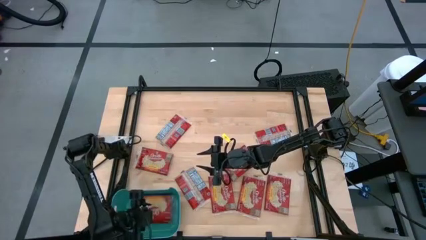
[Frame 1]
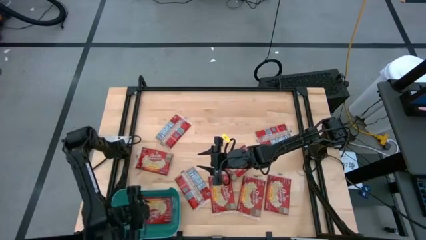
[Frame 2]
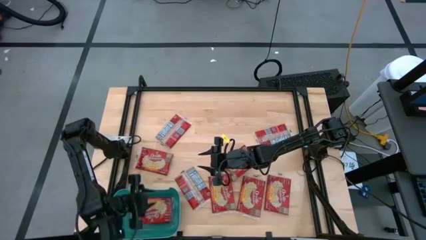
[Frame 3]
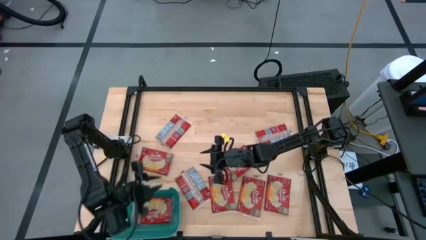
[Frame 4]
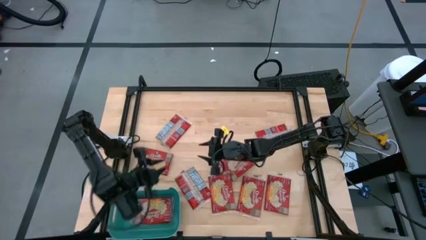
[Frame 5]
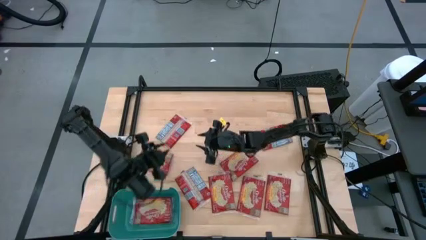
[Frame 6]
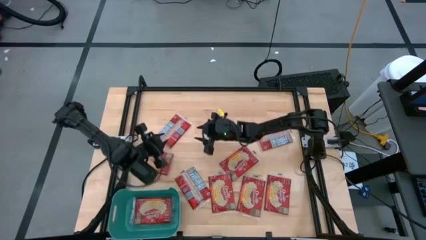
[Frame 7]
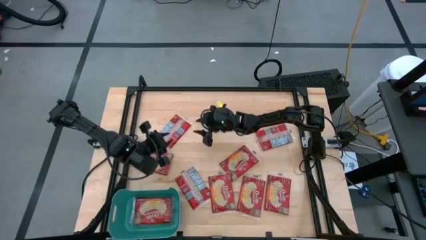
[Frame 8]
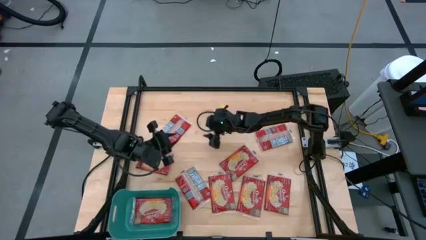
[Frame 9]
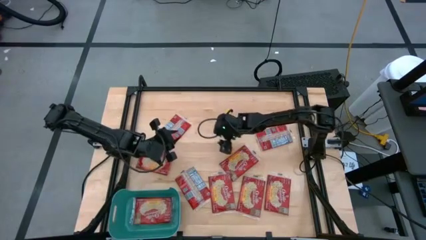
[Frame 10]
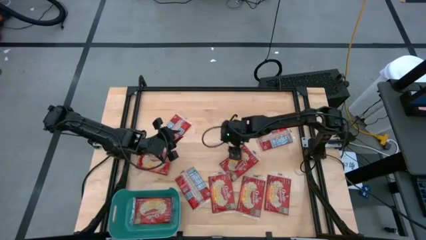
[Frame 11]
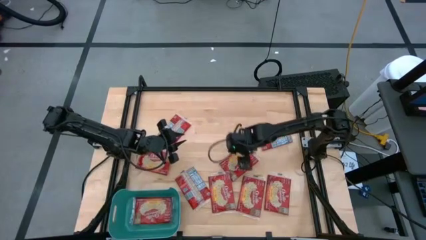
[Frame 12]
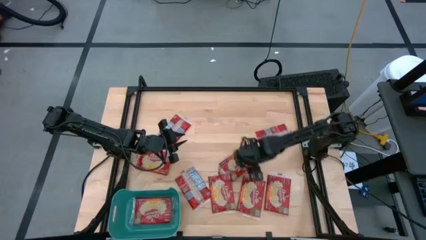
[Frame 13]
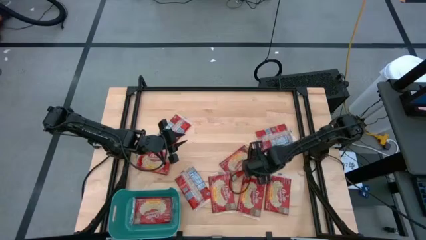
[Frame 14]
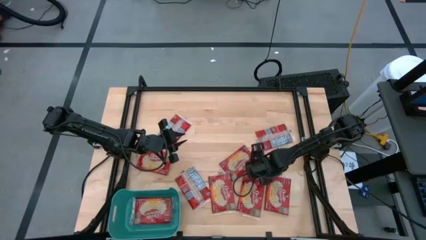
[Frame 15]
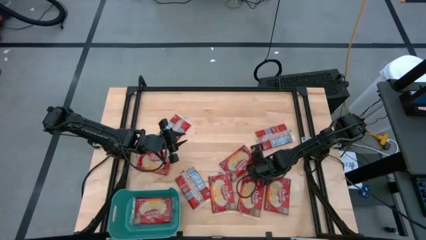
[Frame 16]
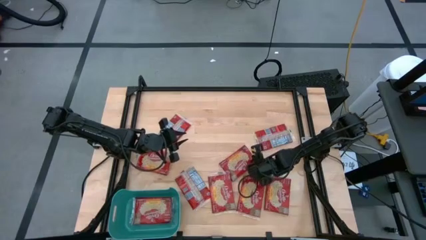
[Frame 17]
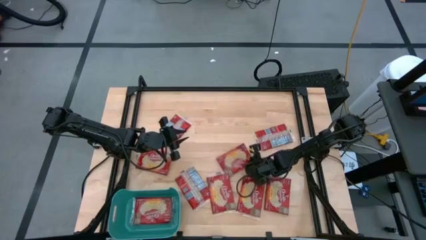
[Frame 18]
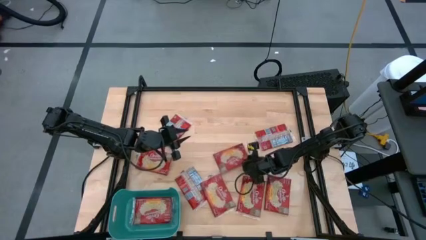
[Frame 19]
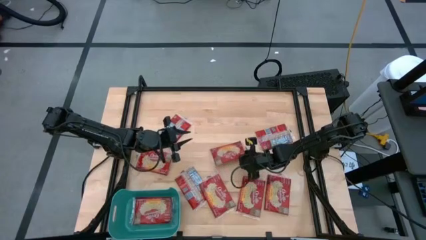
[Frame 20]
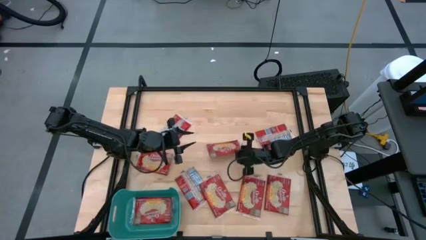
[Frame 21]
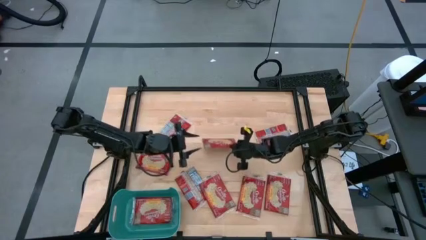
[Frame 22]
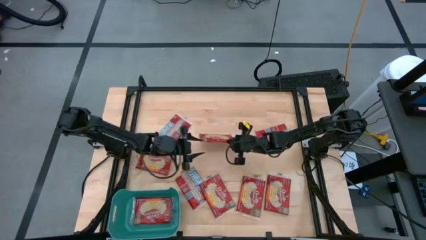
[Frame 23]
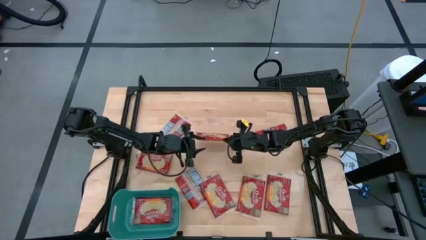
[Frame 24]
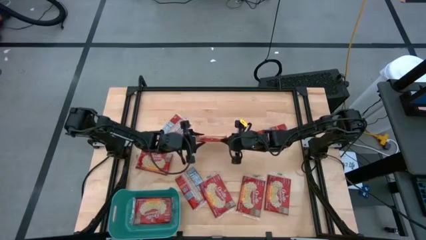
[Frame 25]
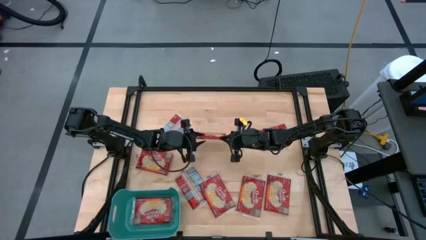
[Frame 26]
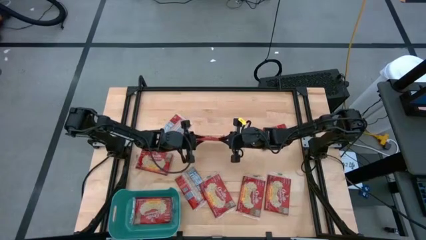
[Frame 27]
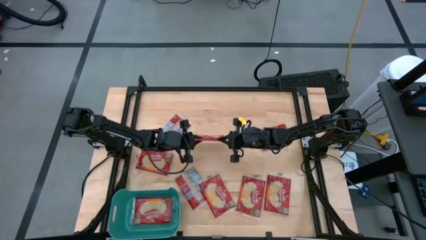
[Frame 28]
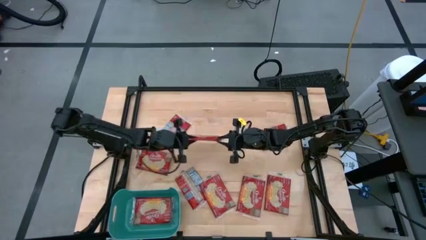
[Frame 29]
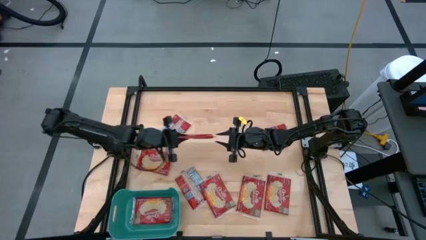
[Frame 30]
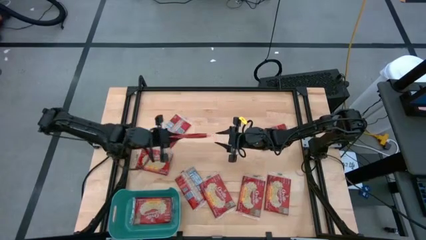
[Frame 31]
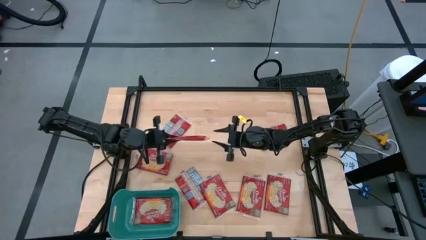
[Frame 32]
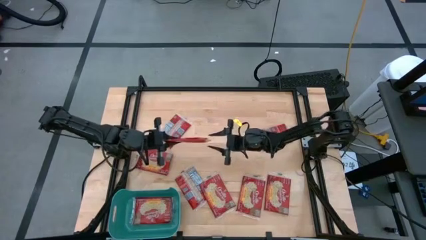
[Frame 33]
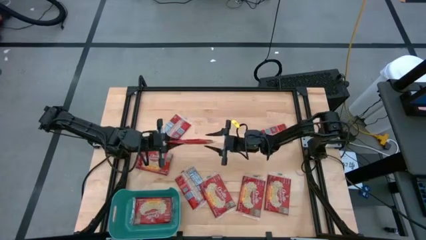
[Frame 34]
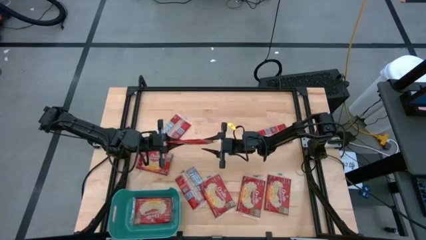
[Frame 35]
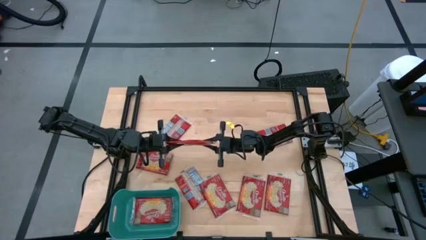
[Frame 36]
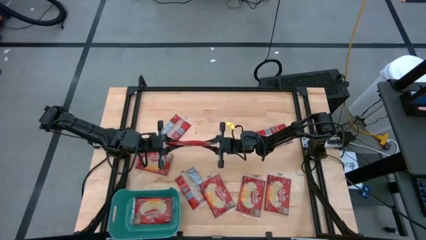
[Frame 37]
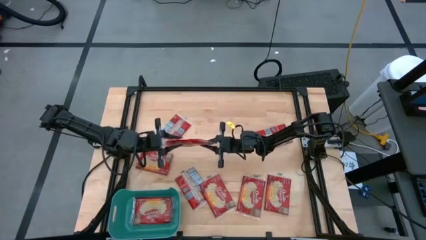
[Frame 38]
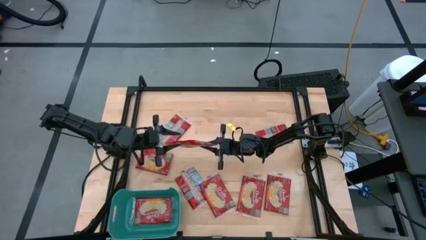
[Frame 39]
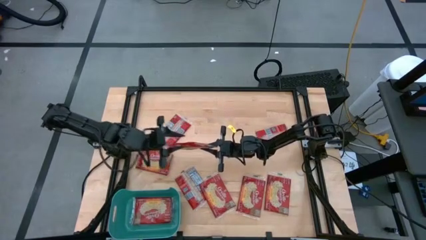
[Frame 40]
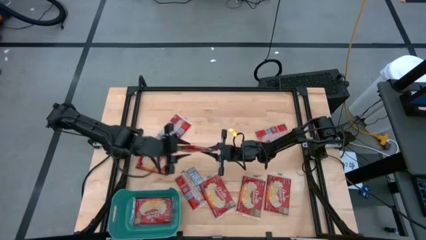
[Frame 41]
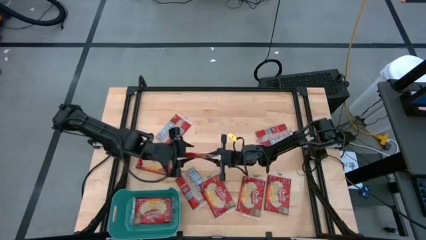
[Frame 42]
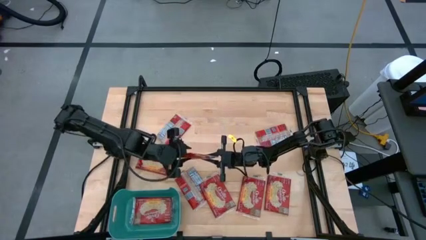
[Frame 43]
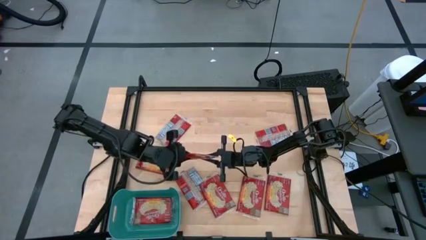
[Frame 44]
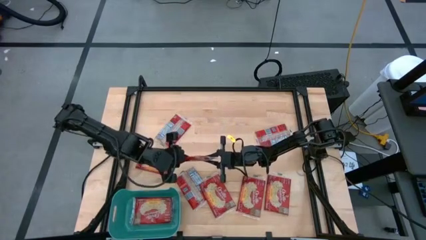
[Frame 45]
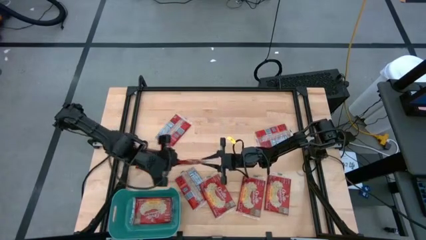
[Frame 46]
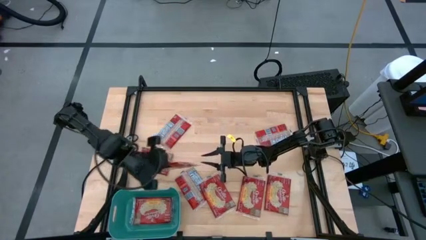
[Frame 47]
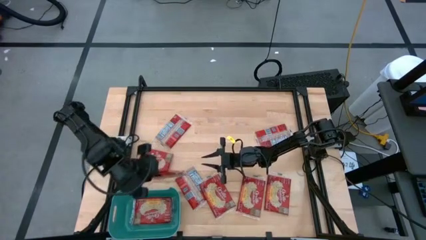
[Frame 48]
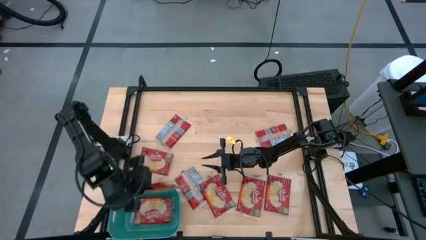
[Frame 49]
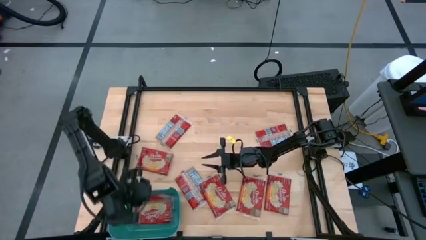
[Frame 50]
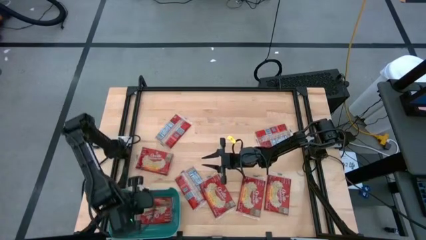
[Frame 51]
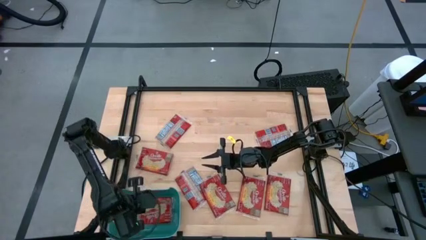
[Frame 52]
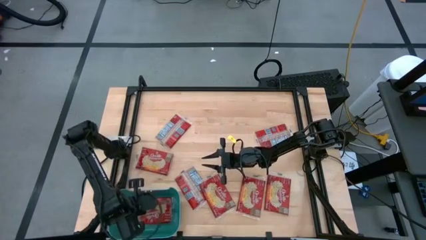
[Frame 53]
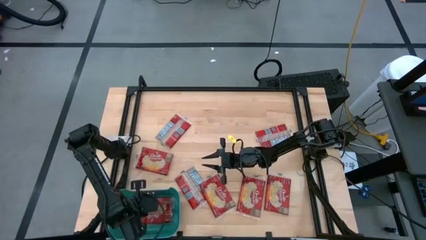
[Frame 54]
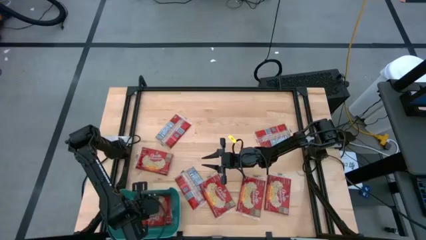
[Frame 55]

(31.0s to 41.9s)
Task: Sort popcorn bags into baskets
Put the red popcorn bag into the blue container

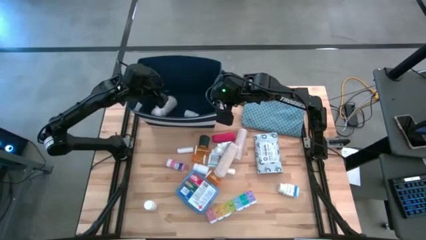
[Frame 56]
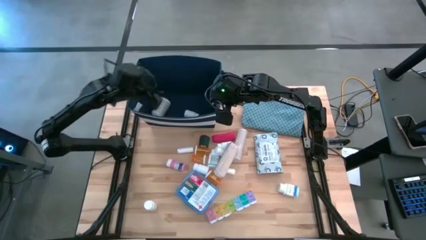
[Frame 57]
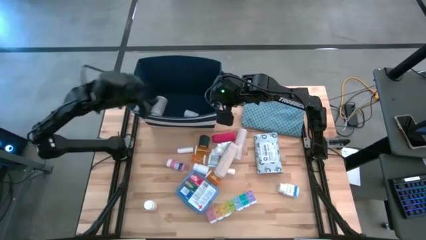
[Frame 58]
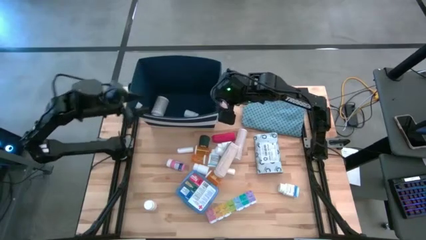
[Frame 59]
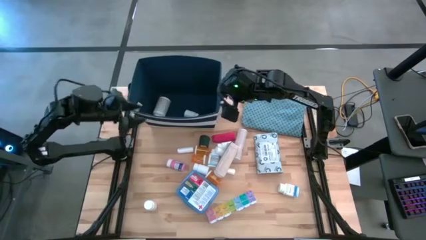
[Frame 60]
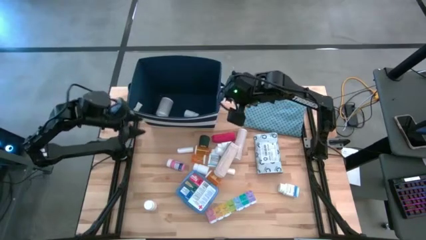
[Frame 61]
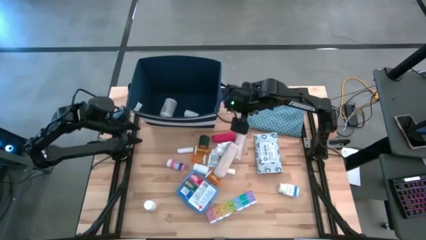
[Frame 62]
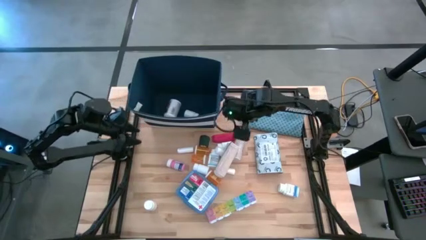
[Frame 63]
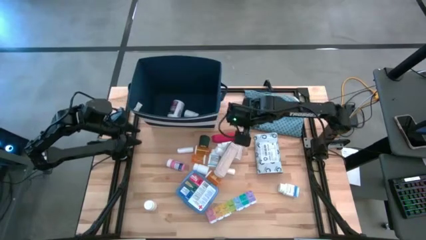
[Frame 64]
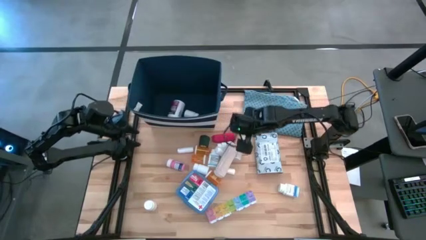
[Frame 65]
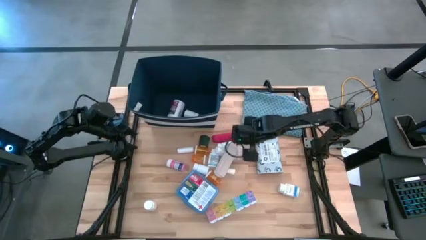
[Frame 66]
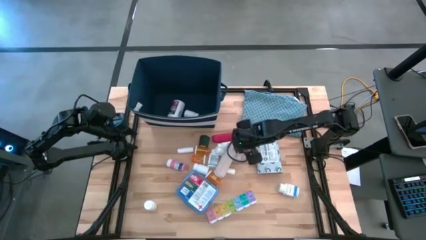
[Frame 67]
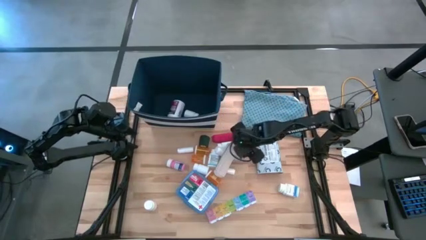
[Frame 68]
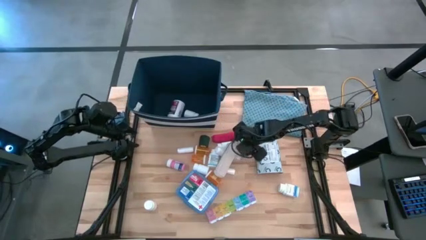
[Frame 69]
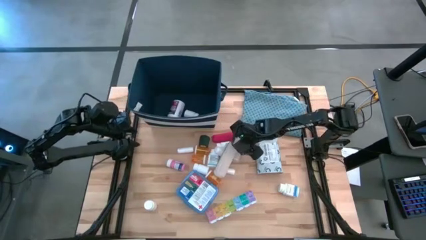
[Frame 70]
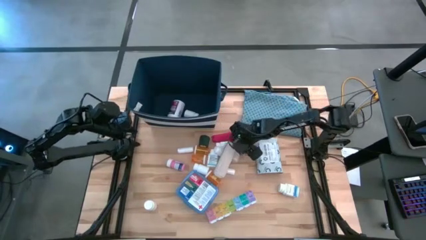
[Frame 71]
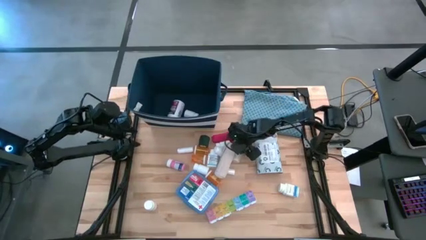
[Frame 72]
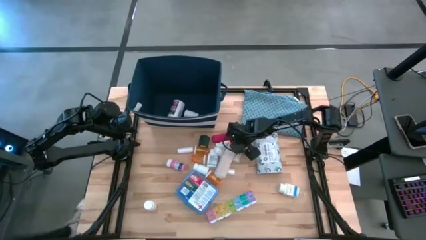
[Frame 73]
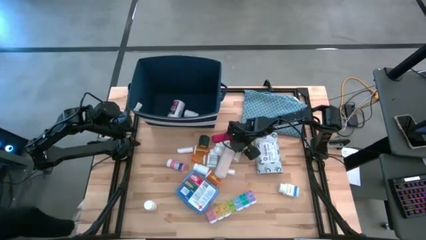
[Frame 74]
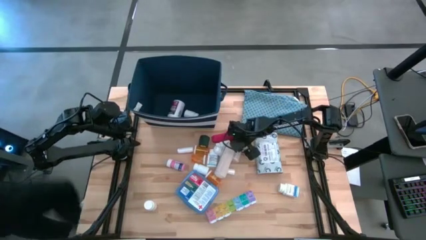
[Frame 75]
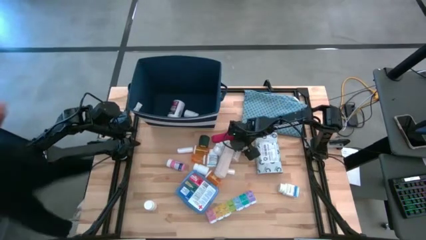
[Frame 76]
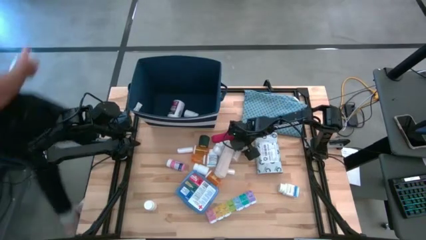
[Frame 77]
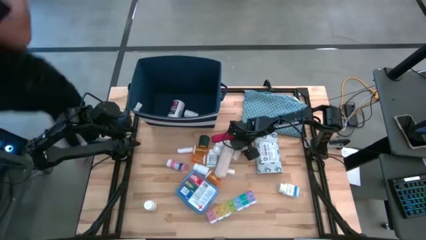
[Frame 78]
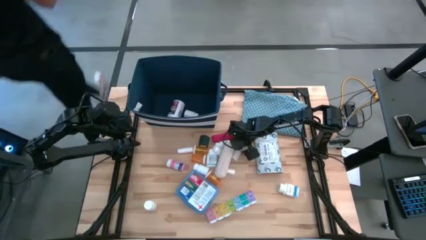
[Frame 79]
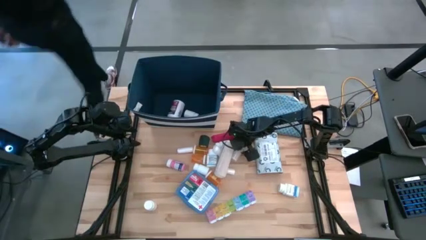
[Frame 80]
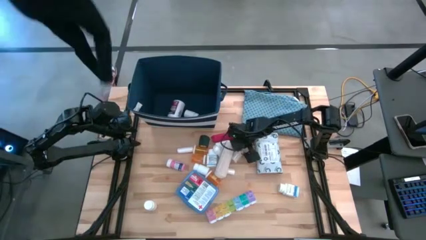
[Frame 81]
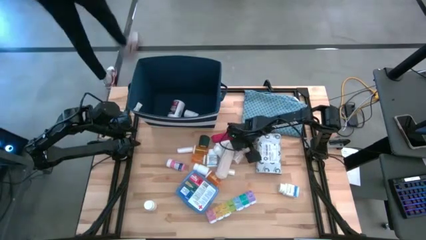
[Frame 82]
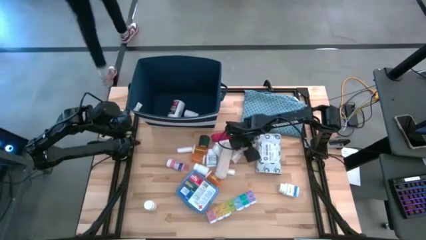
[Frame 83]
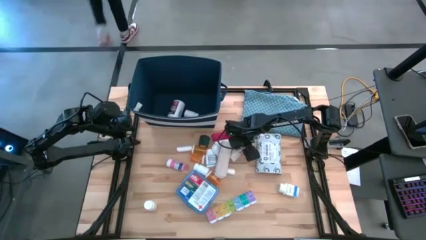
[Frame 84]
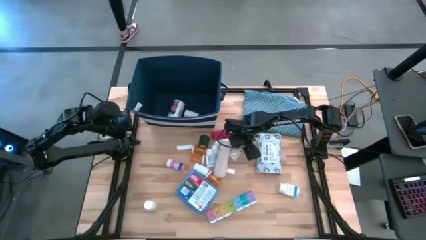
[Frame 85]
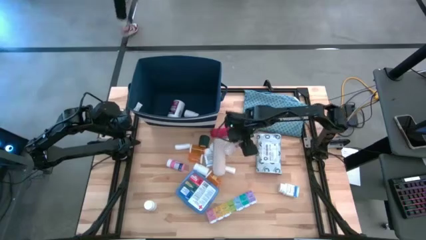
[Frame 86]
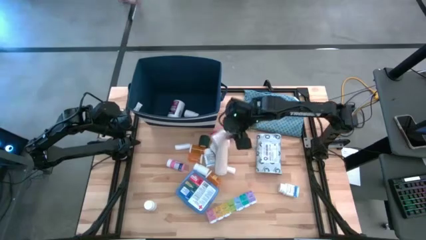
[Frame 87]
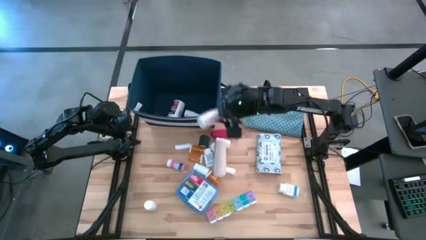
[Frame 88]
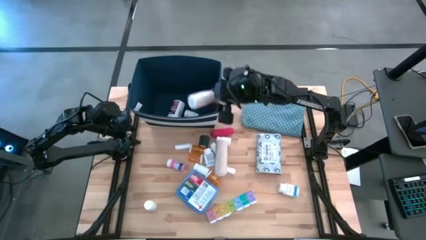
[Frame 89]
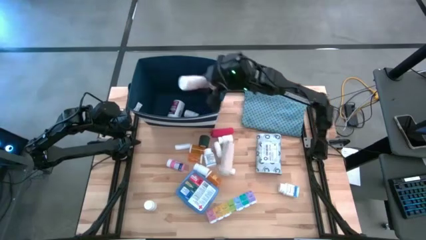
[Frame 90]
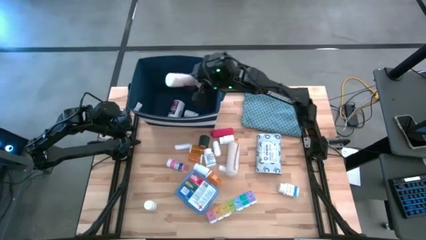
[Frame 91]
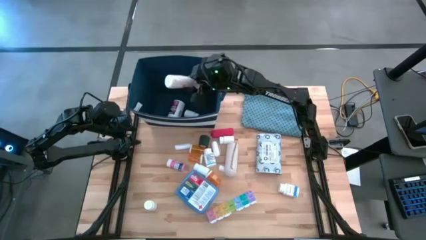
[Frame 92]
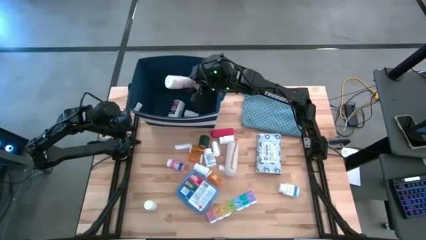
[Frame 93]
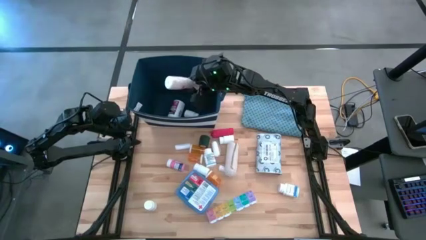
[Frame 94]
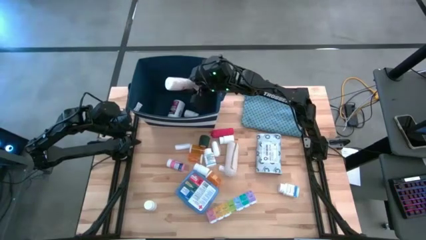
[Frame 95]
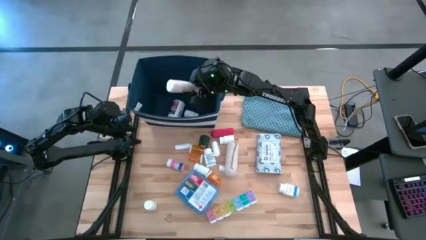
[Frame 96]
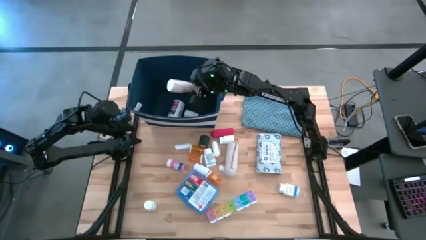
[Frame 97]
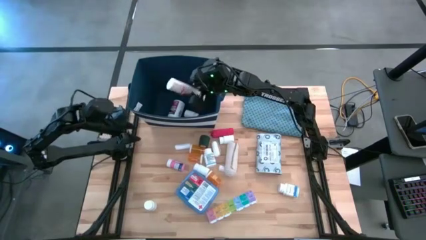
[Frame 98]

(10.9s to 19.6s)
Task: Pick & place medical supplies in basket/bin
Put the brown bandage into the blue bin
